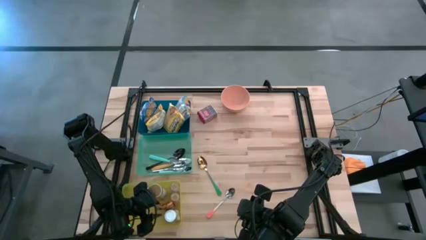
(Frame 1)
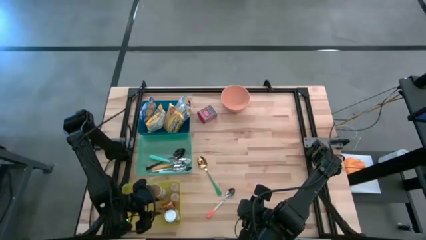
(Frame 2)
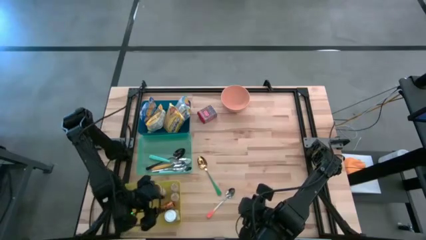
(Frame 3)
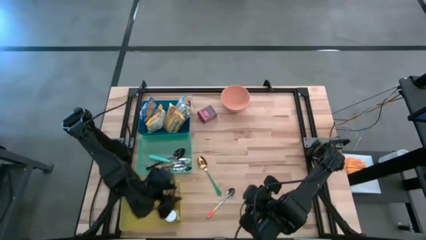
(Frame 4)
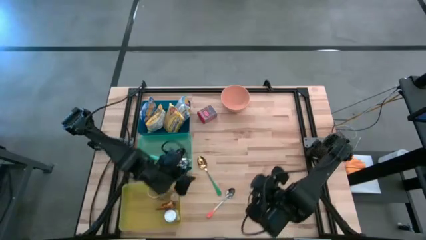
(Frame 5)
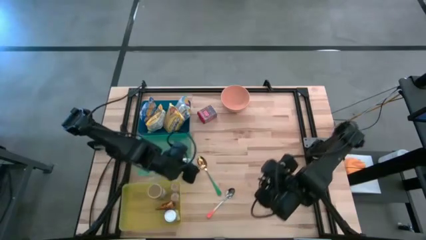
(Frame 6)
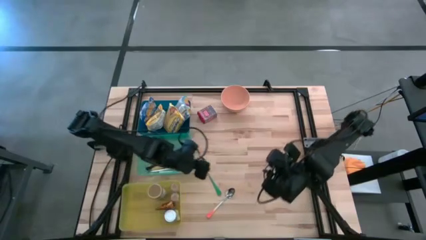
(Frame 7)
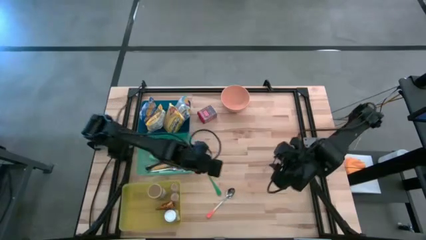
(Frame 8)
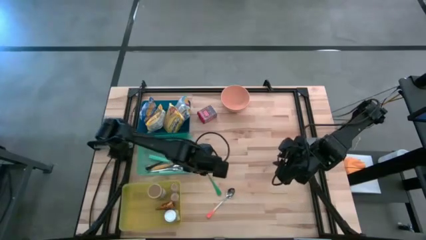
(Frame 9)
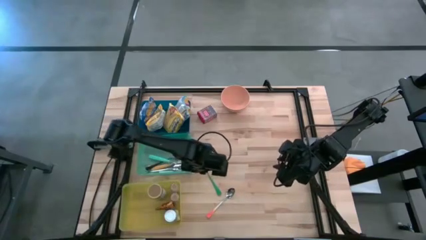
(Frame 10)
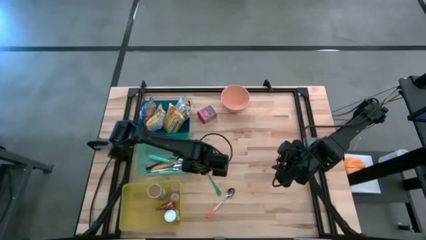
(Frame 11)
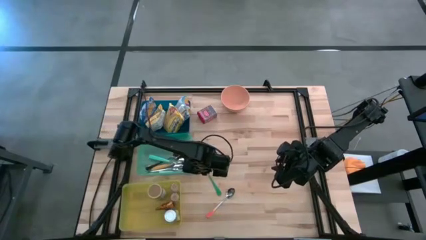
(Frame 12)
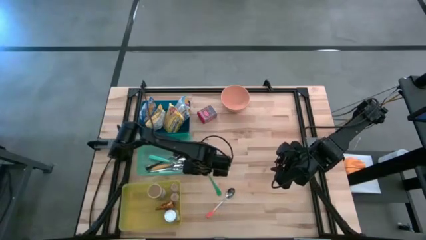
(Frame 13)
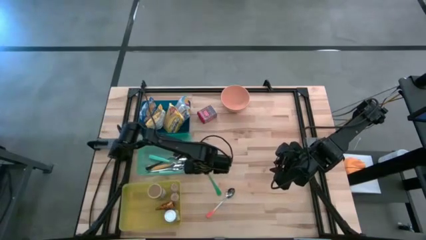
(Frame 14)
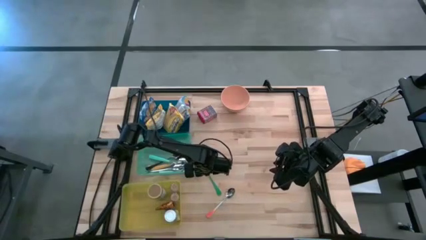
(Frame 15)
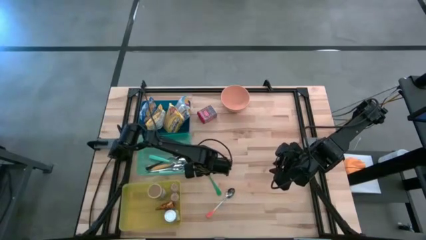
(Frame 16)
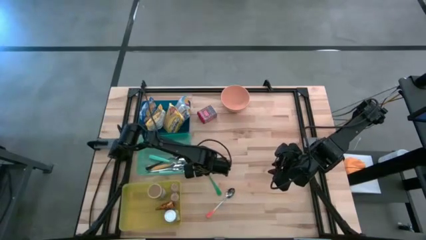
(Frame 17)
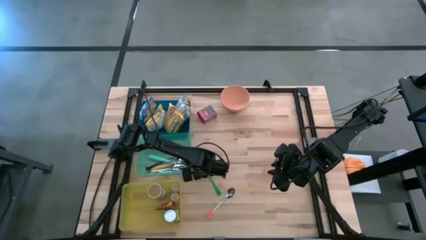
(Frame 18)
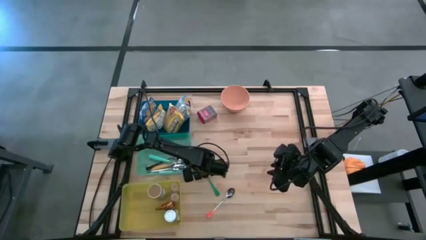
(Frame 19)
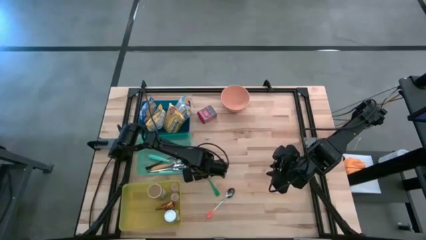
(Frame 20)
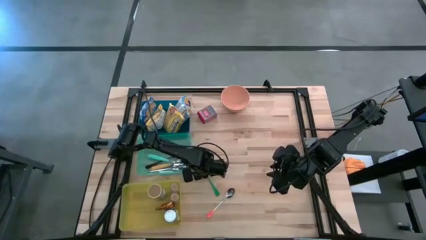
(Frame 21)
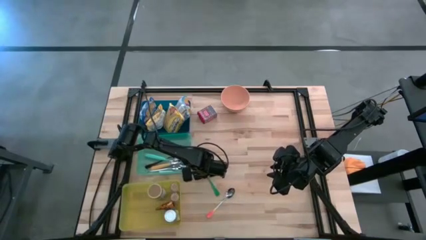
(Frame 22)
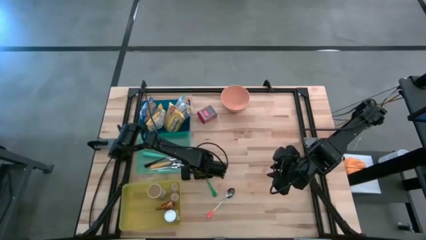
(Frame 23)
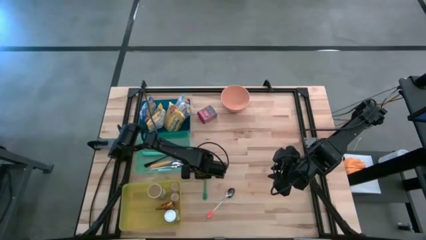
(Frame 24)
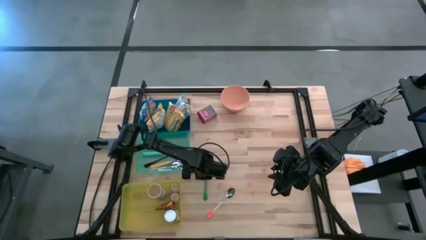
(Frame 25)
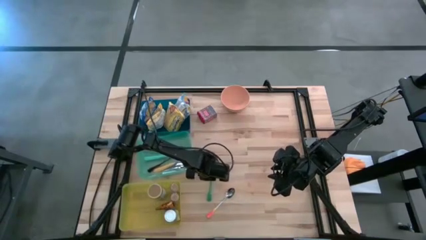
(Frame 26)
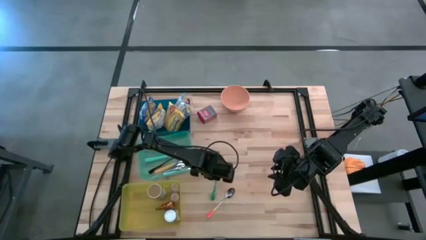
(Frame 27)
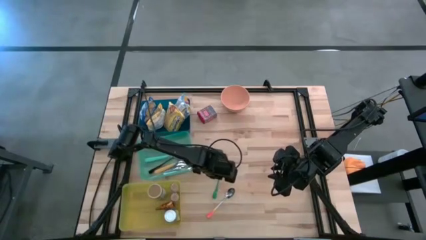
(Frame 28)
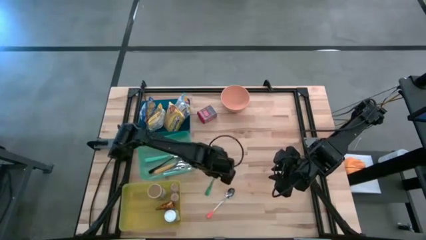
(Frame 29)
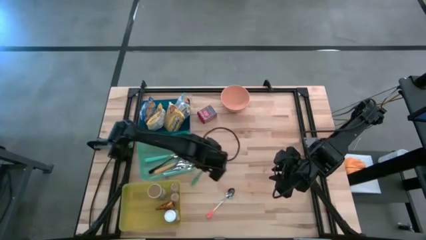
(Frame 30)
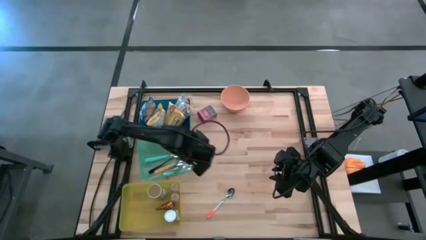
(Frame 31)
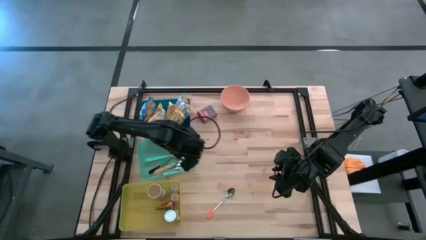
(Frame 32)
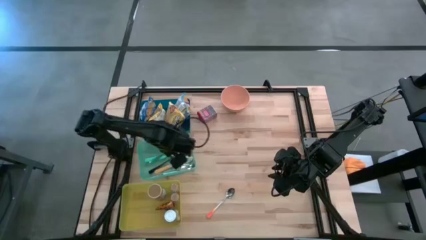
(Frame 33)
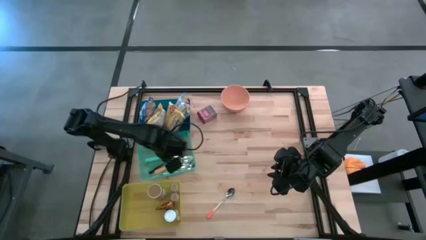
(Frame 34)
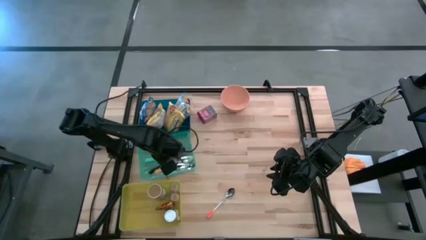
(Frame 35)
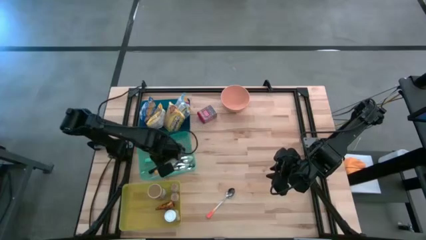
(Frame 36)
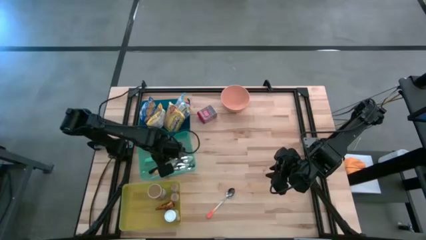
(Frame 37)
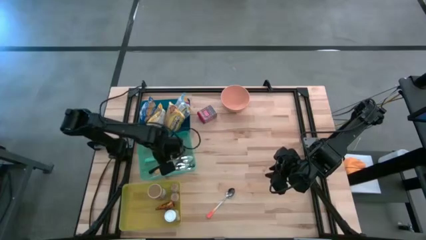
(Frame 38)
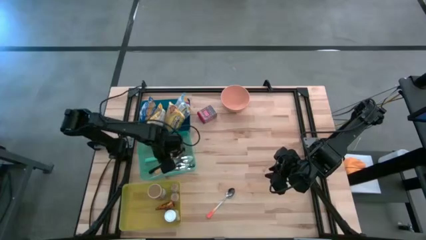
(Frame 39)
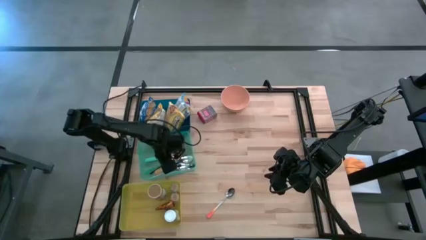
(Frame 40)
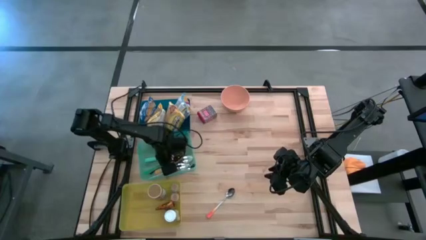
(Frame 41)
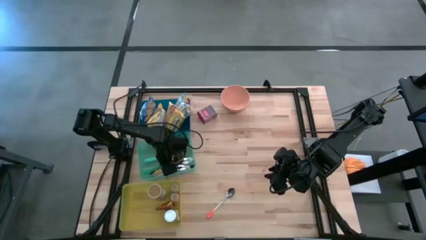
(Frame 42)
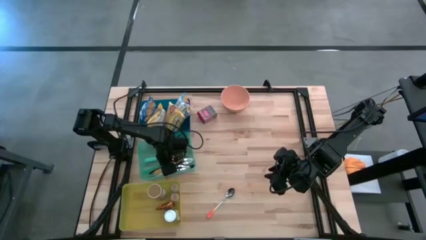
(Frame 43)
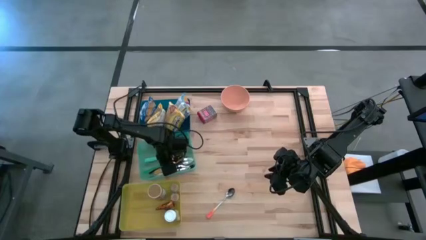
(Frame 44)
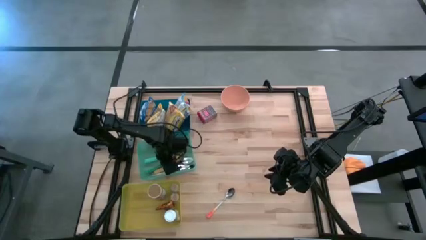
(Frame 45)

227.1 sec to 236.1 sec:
Put the green spoon into the light blue bin

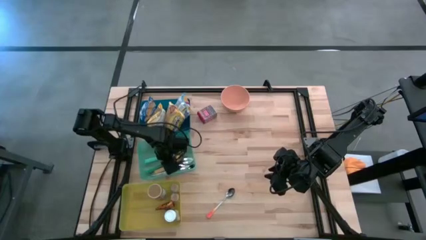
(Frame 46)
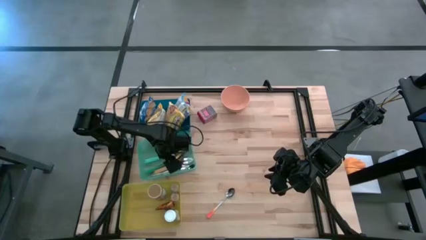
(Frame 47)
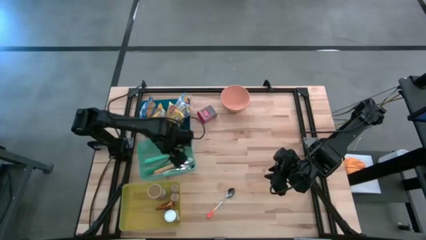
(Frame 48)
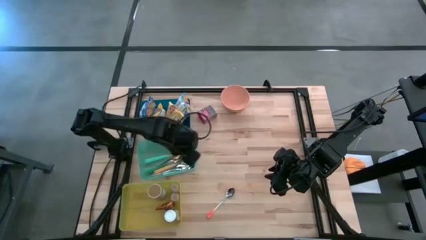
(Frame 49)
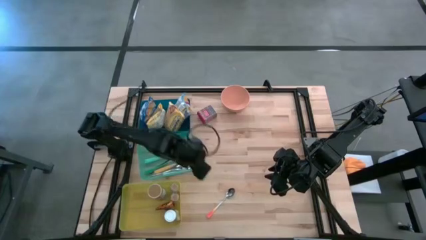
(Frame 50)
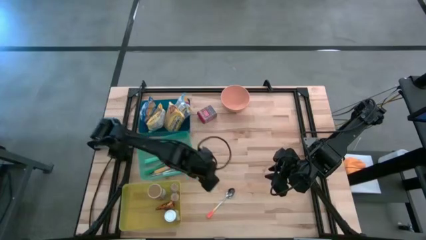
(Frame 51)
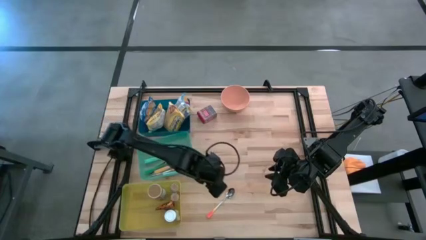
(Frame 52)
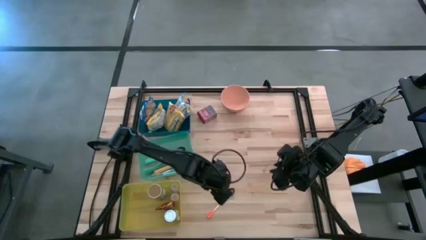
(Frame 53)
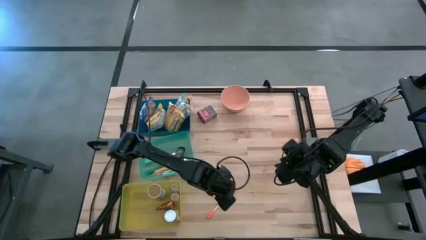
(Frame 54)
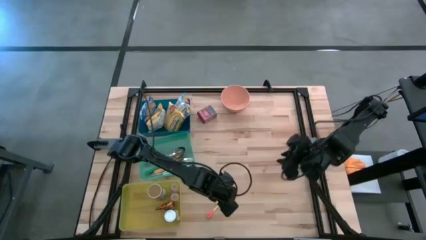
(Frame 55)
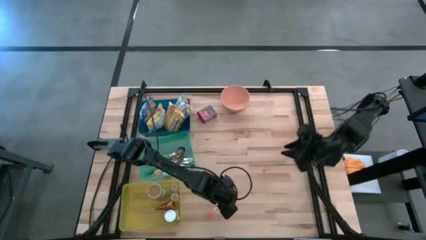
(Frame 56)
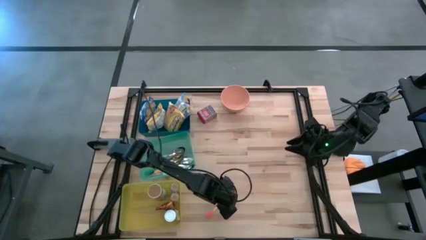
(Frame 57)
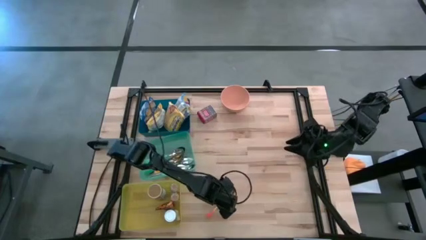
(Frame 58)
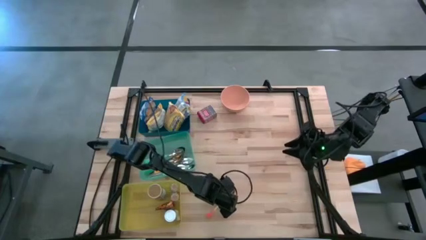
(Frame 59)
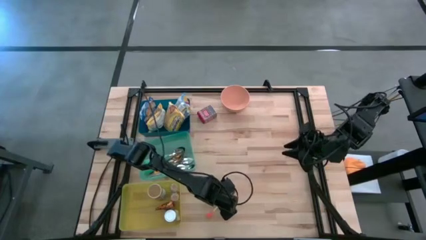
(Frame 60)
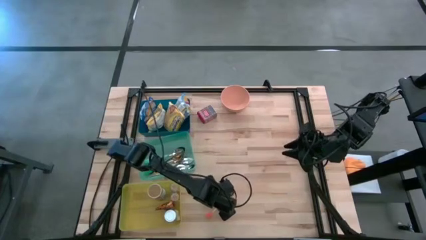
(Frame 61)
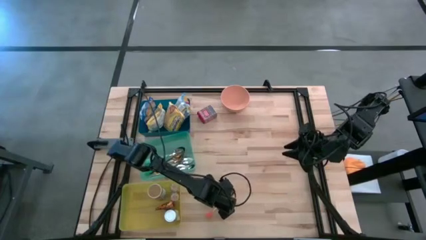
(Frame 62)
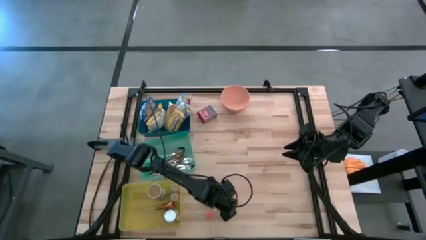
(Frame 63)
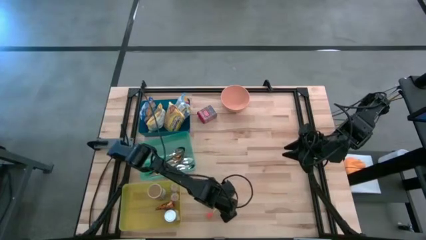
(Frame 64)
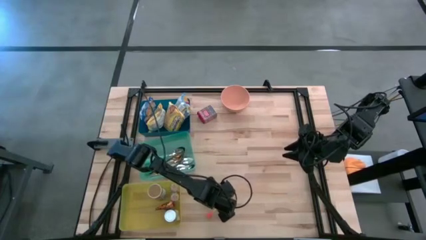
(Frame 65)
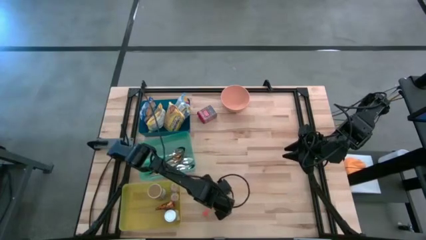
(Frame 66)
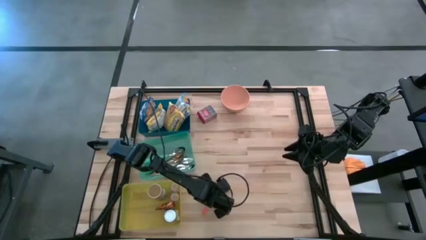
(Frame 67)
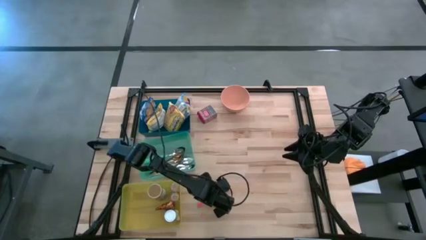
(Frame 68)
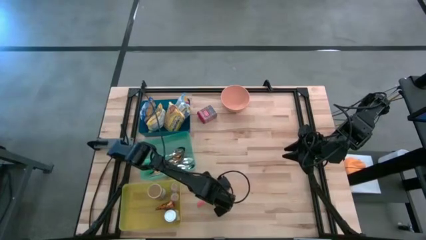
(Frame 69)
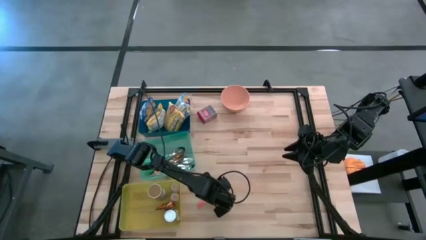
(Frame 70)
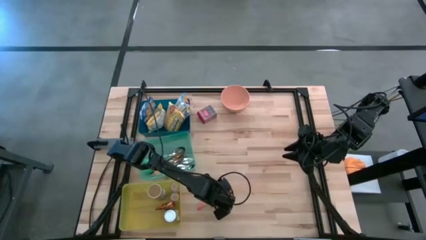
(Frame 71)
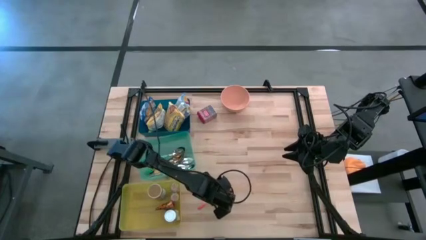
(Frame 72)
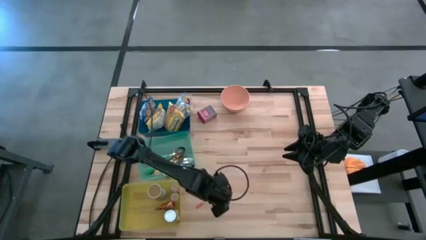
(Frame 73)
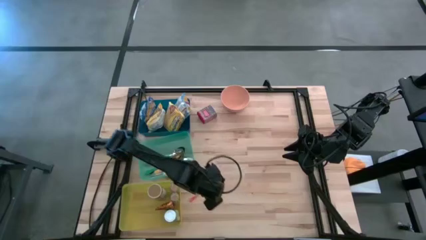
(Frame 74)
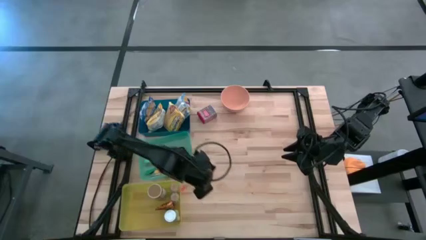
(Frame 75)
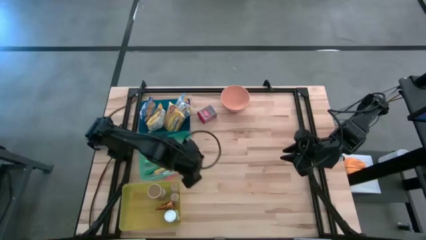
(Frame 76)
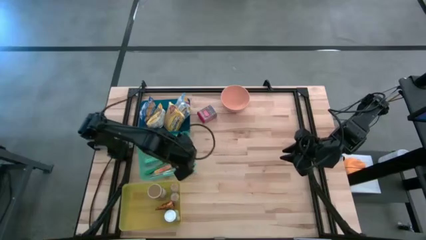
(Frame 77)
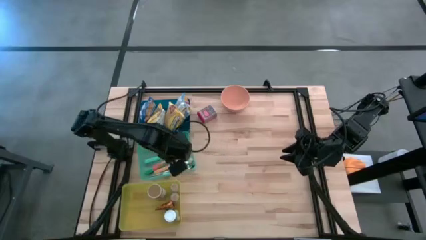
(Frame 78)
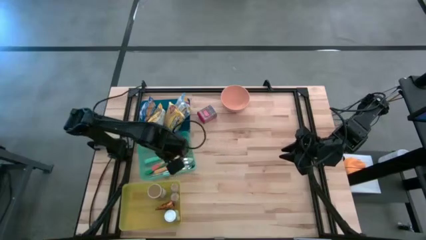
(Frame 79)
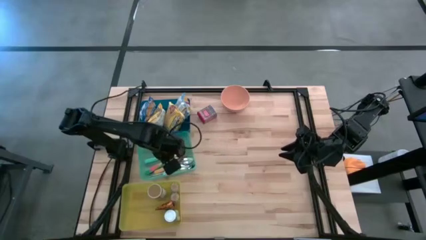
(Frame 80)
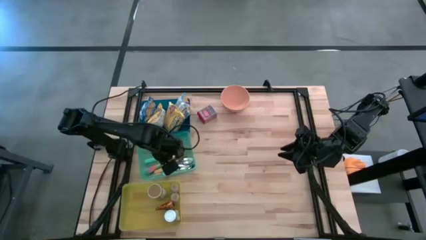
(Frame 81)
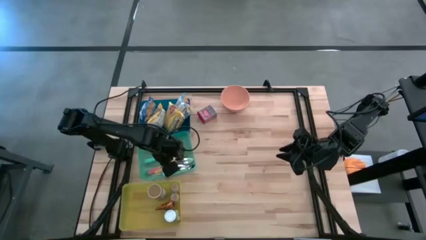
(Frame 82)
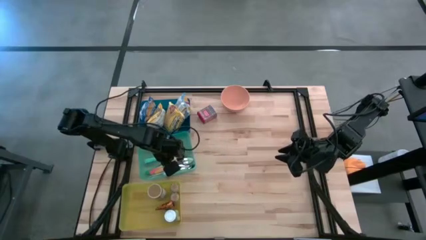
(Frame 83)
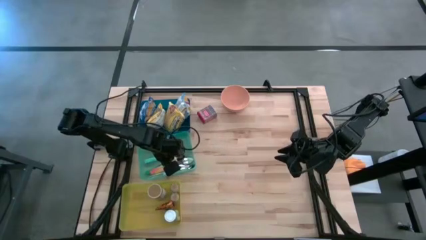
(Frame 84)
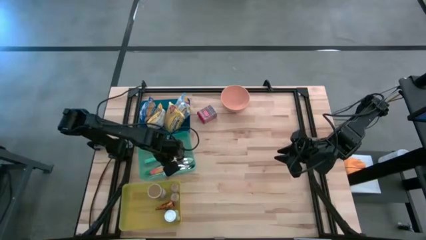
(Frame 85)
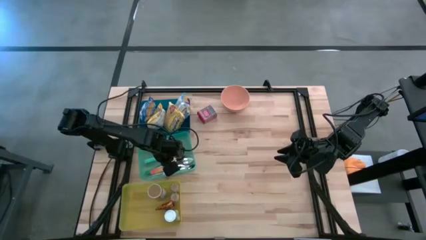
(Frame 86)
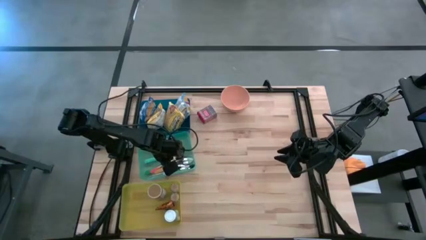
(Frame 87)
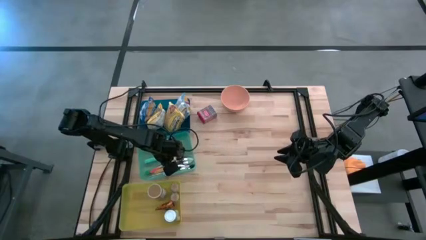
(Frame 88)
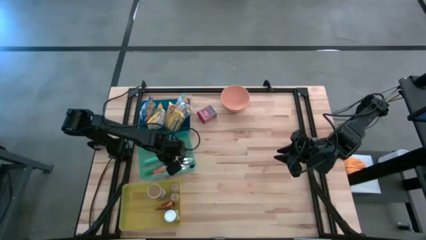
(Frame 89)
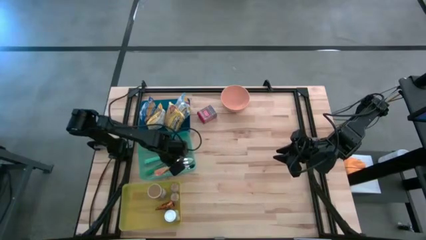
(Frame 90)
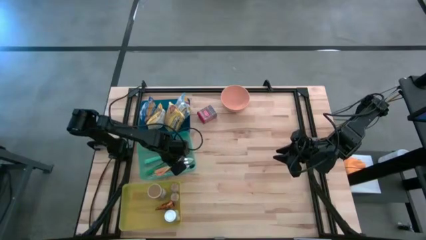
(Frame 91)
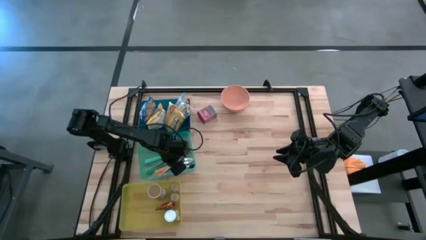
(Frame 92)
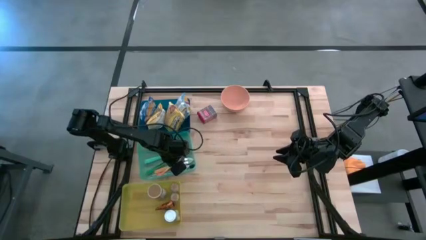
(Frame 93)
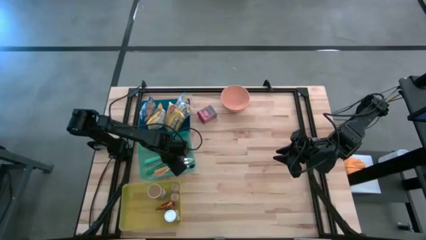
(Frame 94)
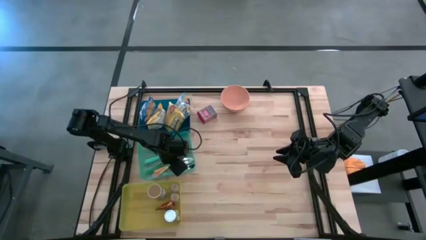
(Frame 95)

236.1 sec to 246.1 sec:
Put the orange spoon into the light blue bin
